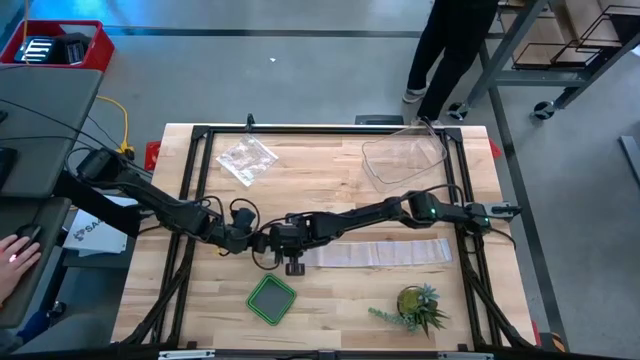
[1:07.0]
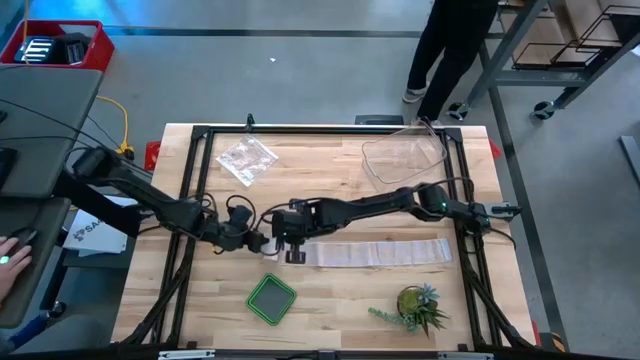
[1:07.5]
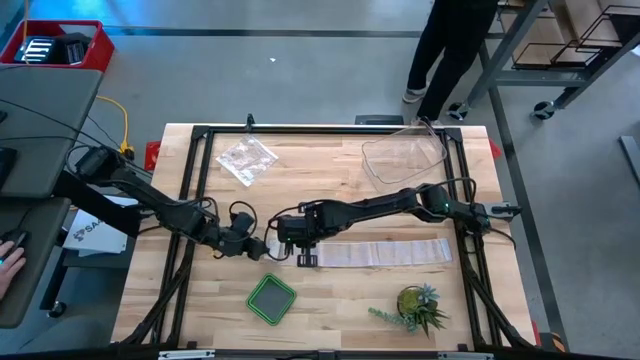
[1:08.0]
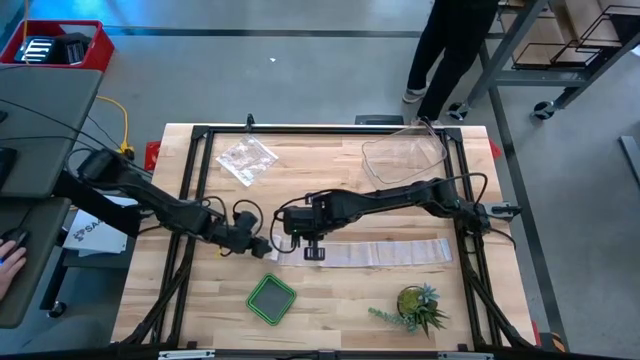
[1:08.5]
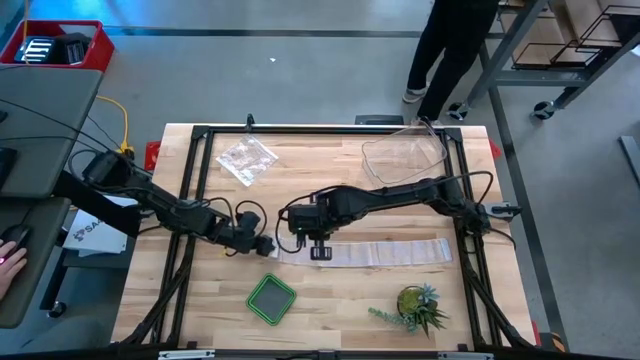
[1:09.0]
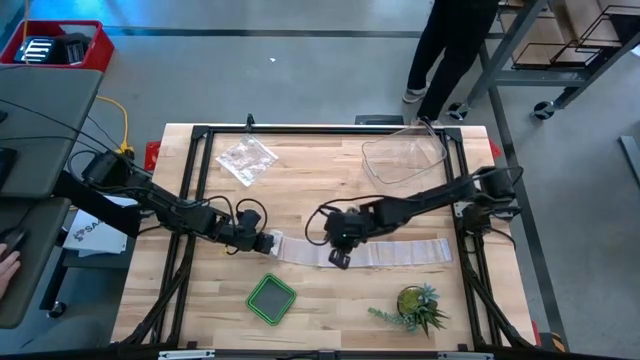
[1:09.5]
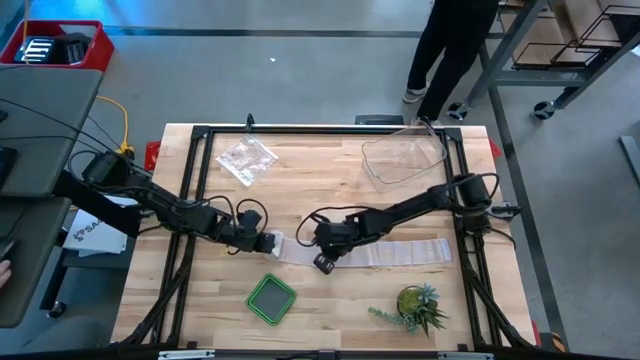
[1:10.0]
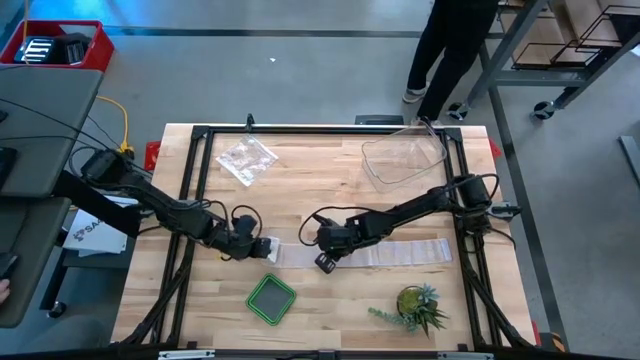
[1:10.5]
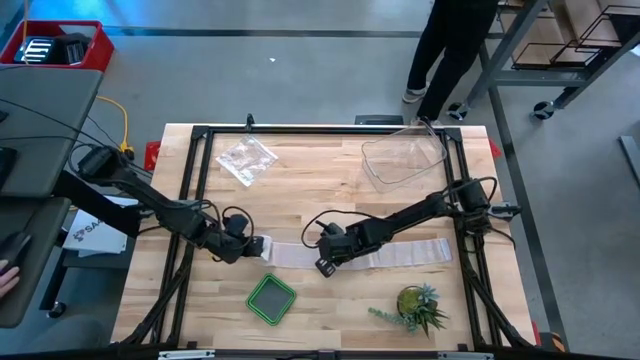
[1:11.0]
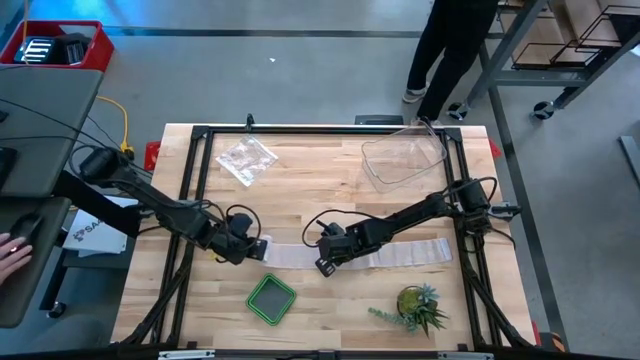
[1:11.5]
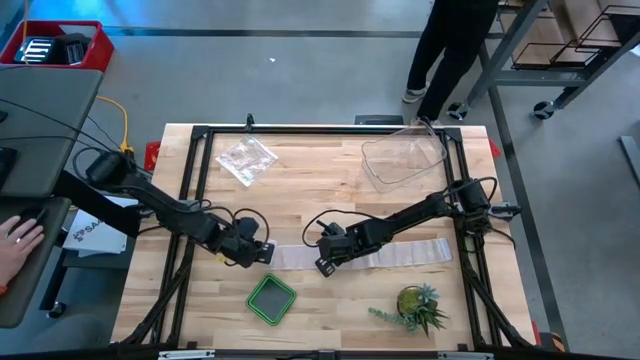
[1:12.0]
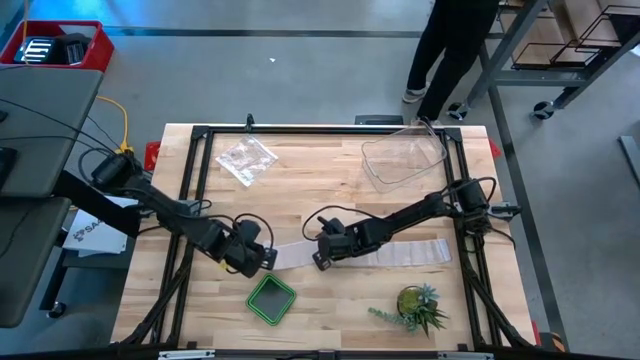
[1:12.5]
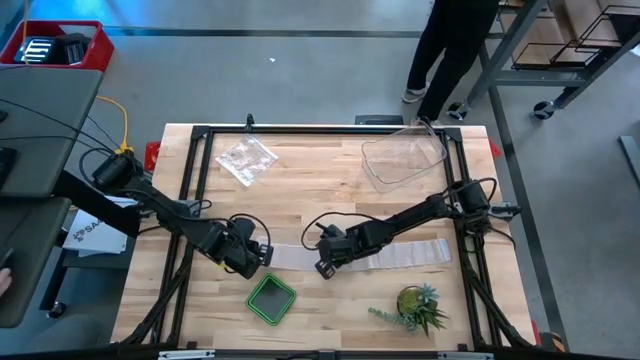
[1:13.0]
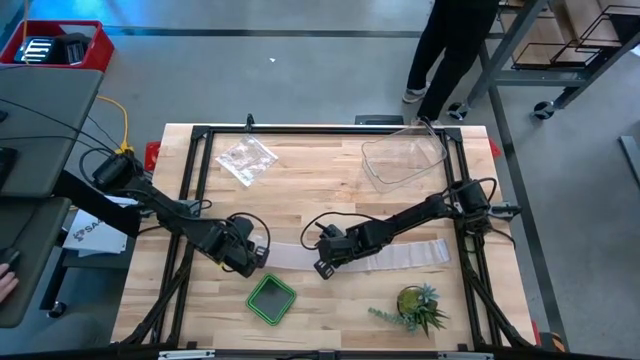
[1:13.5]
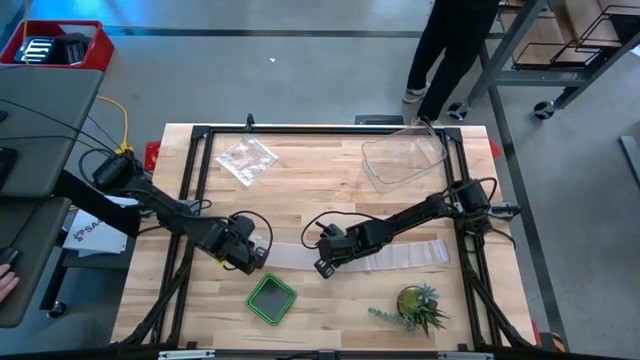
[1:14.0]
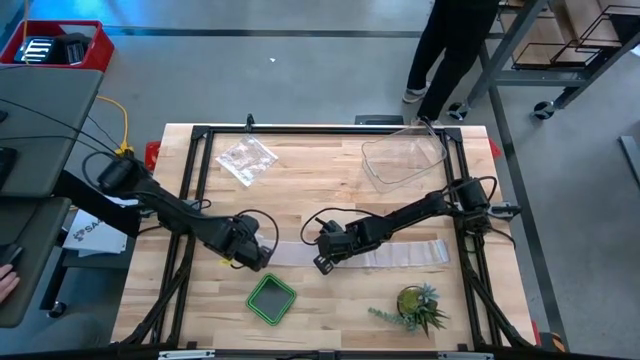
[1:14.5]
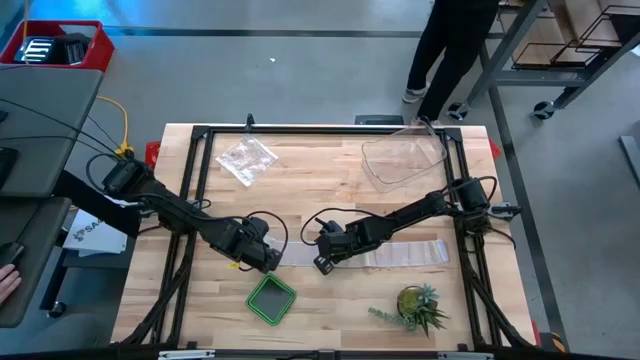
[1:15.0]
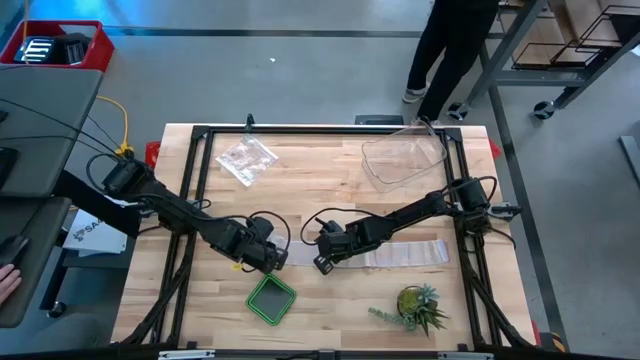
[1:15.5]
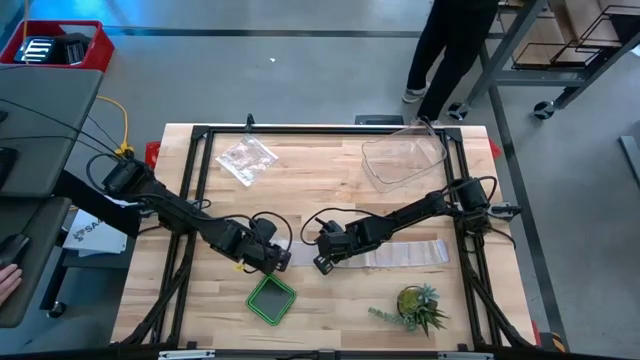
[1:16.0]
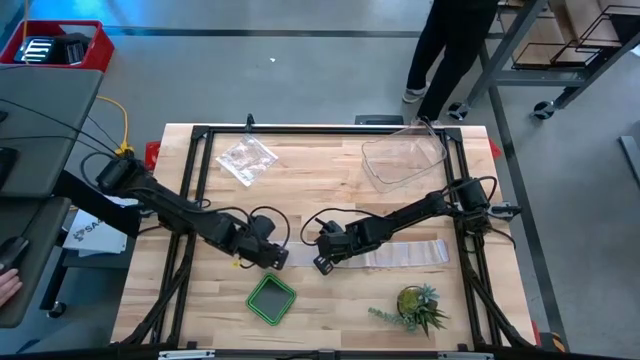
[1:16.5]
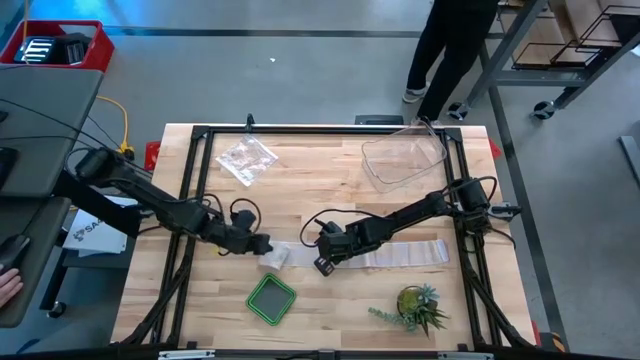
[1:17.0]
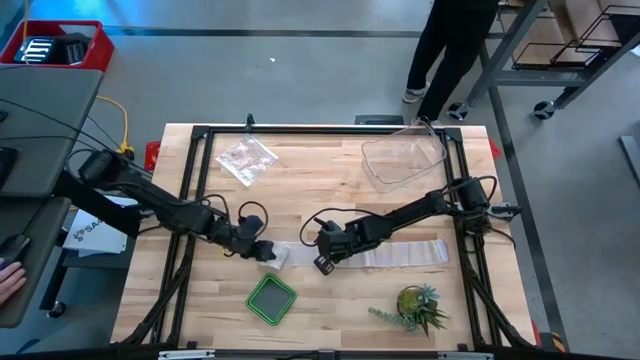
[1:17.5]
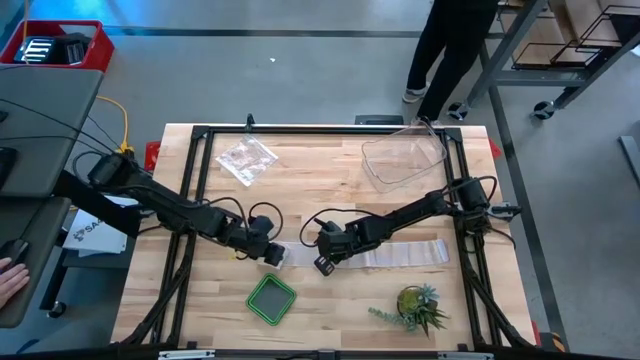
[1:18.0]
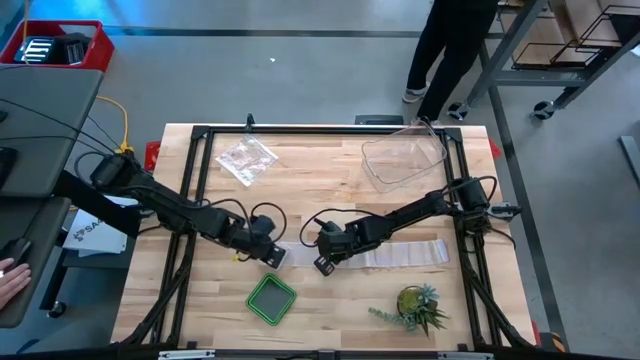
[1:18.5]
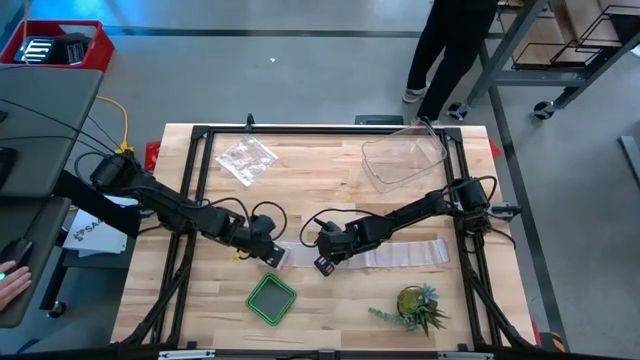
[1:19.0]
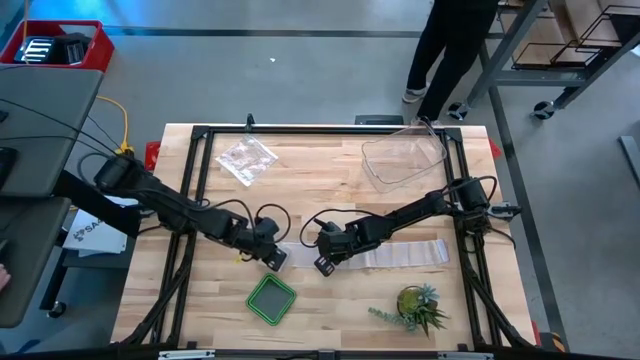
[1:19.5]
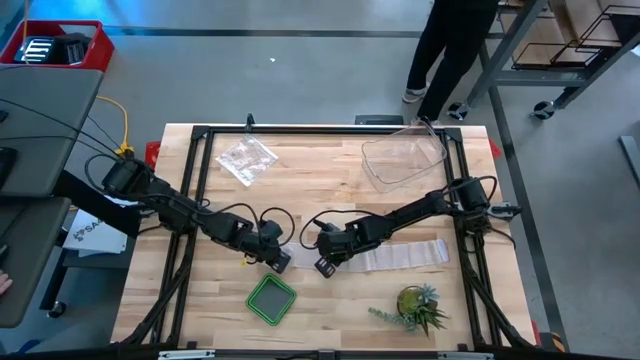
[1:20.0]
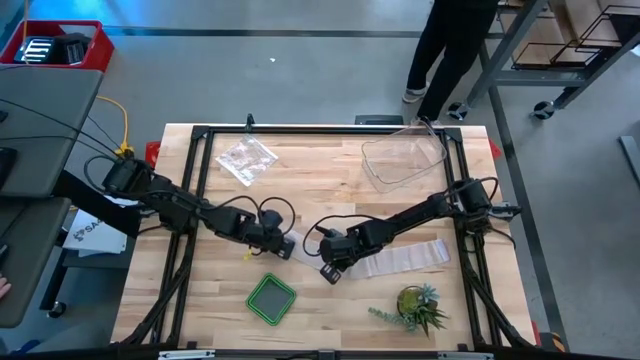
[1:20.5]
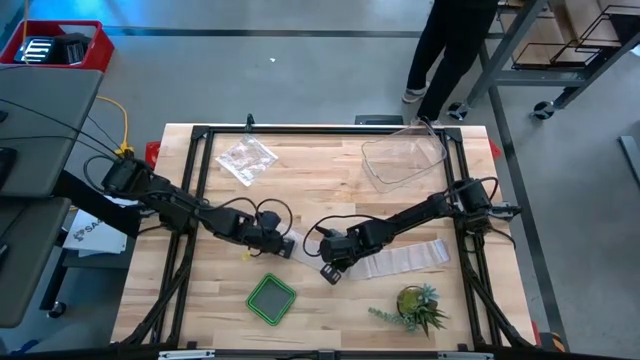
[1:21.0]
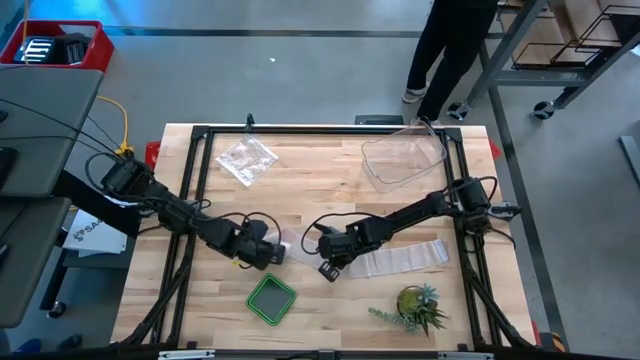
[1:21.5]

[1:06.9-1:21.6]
Task: Roll bandage
Roll the white bandage

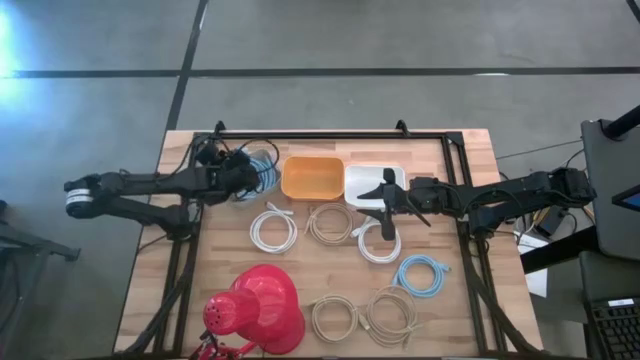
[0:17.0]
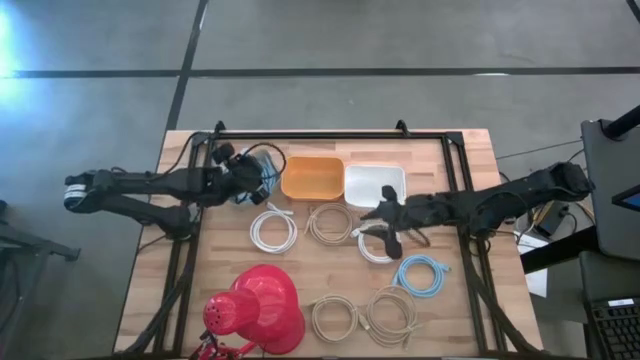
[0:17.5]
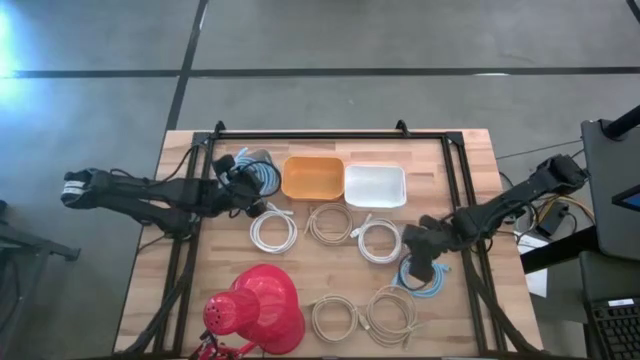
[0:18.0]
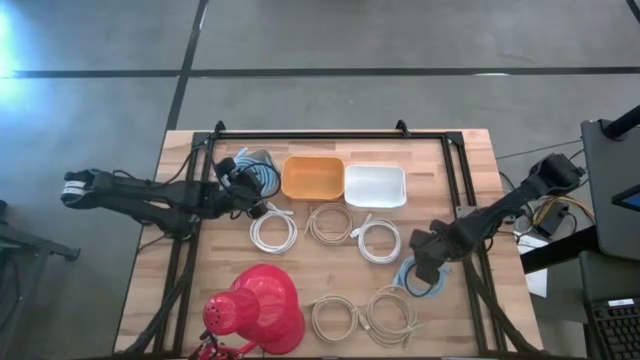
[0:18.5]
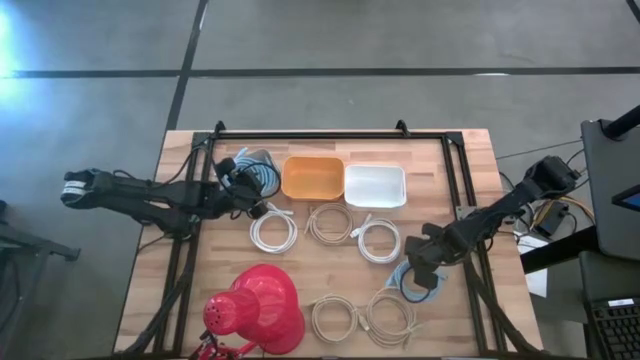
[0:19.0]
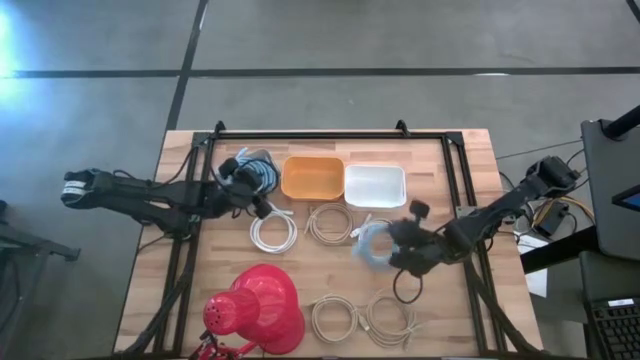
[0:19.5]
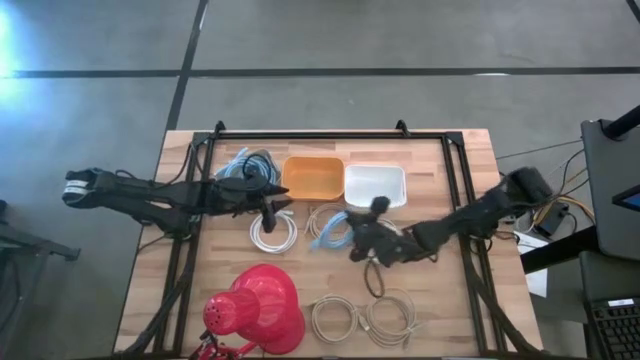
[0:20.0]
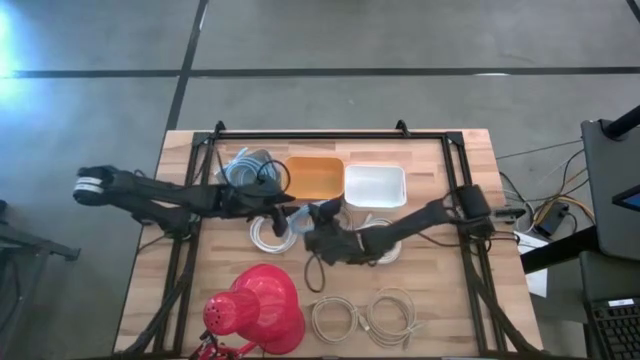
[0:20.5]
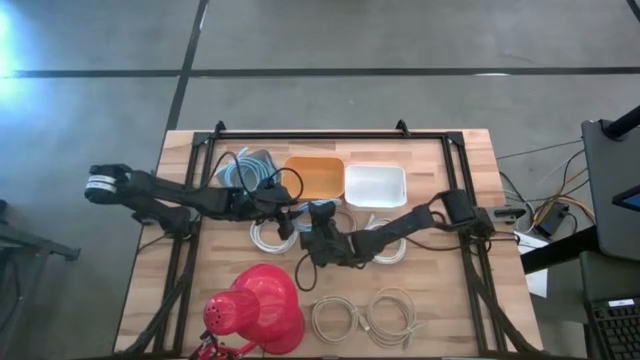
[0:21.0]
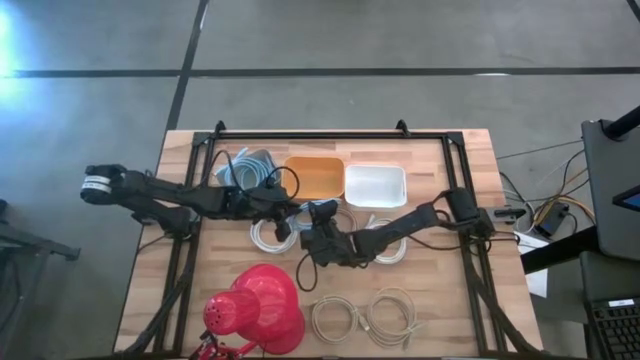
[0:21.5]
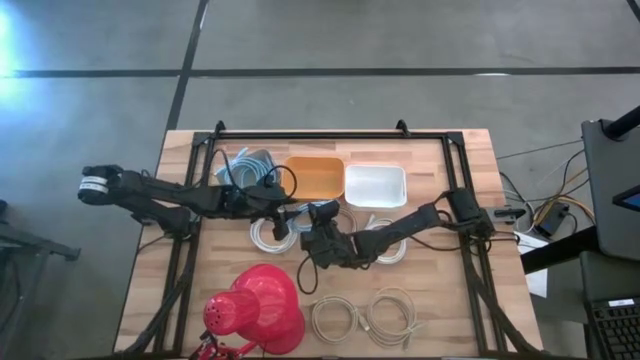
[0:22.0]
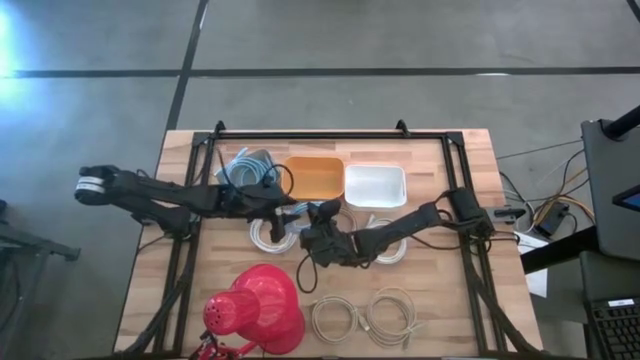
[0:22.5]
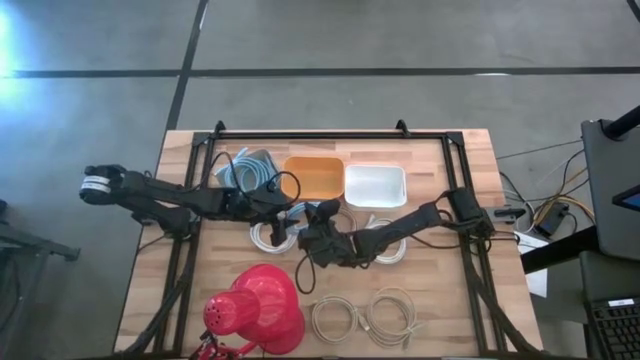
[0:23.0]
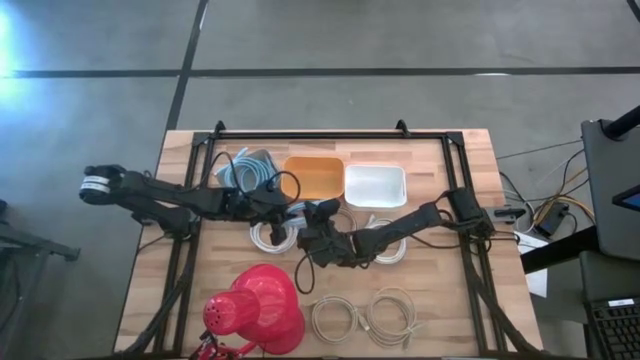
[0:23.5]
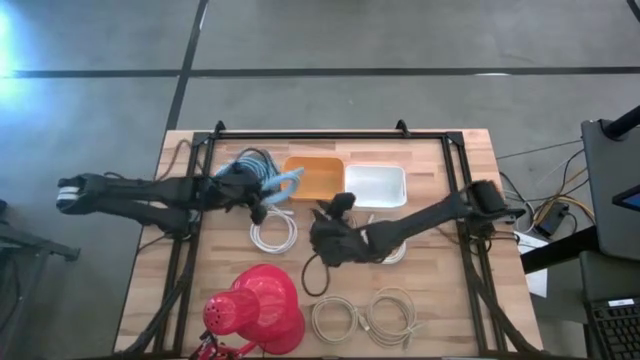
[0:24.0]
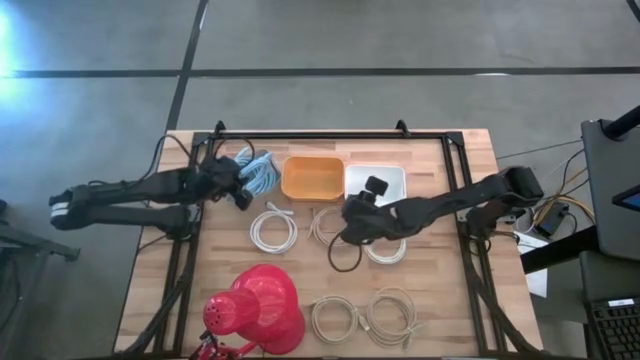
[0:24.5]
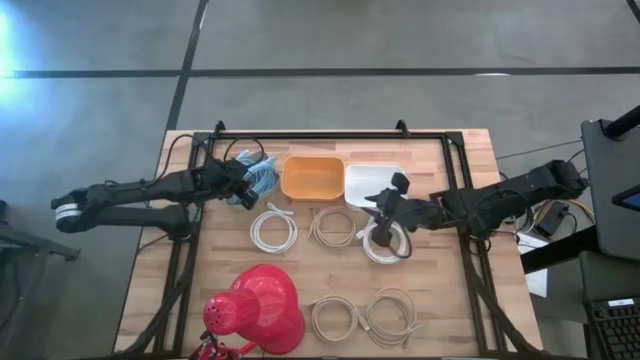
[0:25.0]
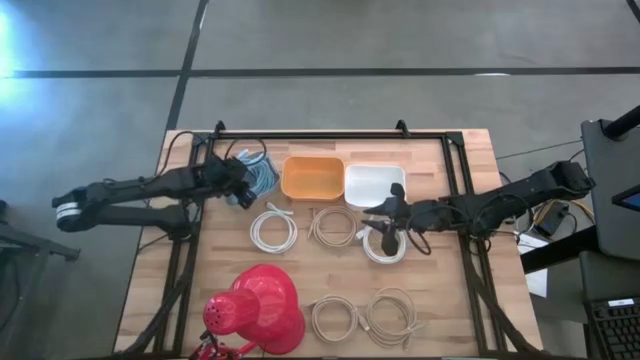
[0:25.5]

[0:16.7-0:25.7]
Task: Sort HDMI cables
Put the light blue HDMI cable into the gray bin
